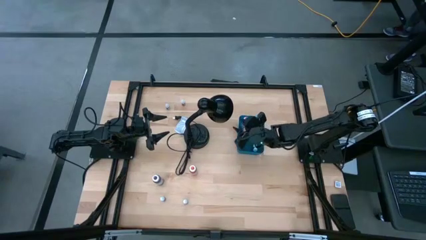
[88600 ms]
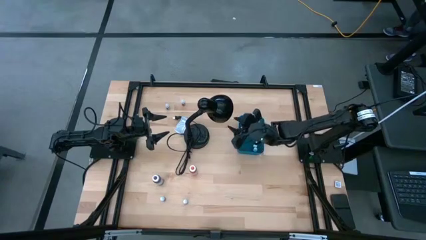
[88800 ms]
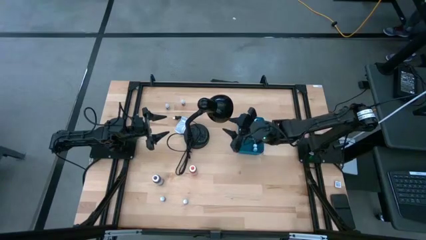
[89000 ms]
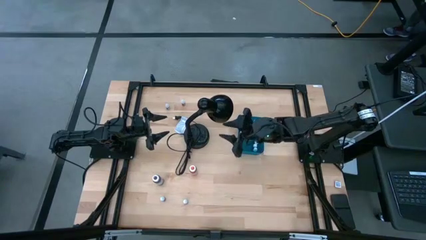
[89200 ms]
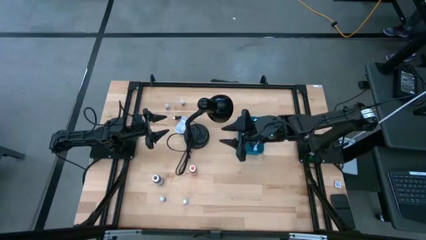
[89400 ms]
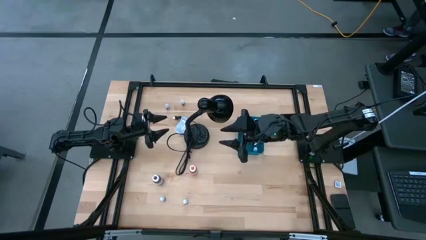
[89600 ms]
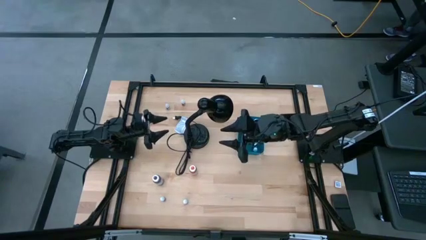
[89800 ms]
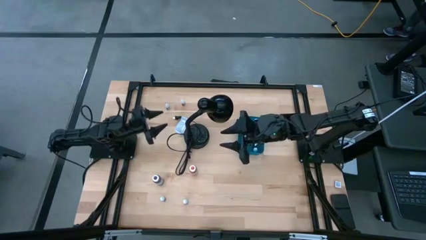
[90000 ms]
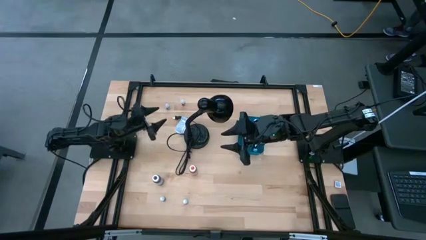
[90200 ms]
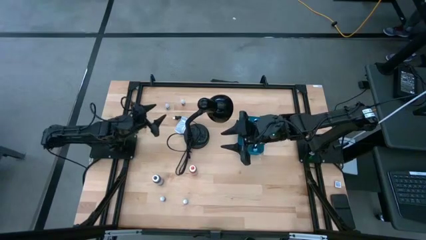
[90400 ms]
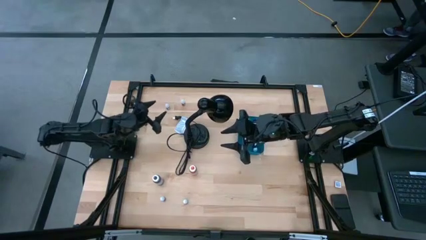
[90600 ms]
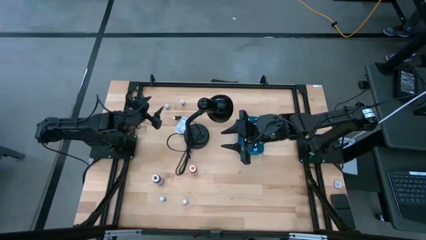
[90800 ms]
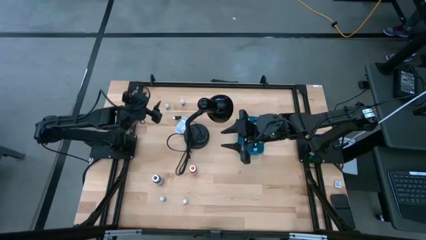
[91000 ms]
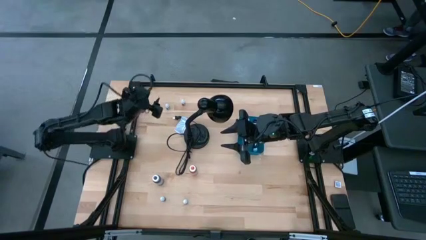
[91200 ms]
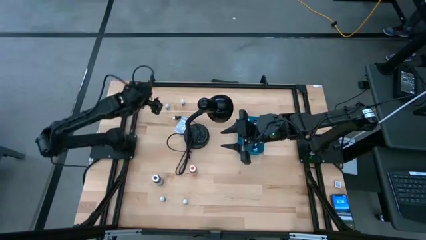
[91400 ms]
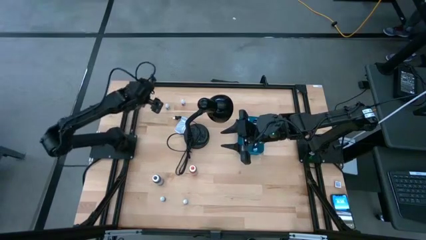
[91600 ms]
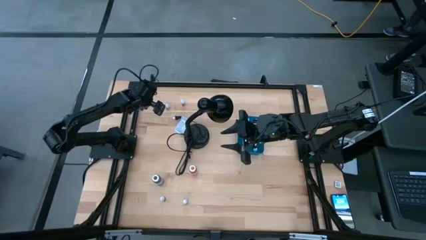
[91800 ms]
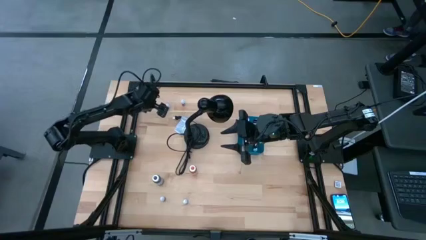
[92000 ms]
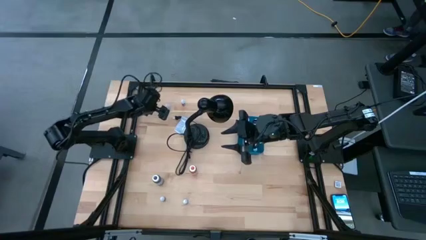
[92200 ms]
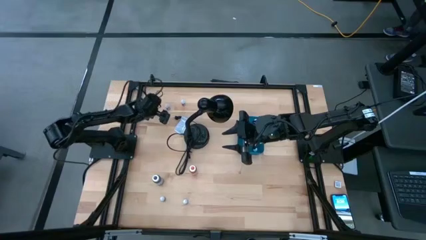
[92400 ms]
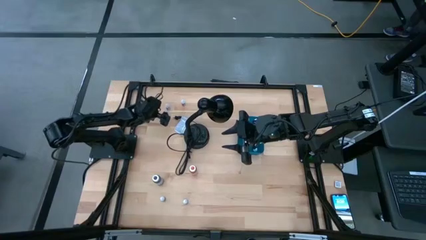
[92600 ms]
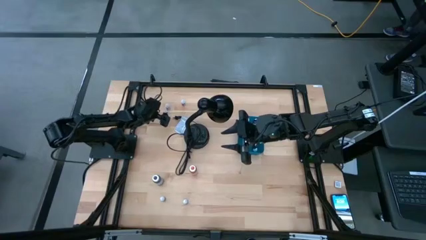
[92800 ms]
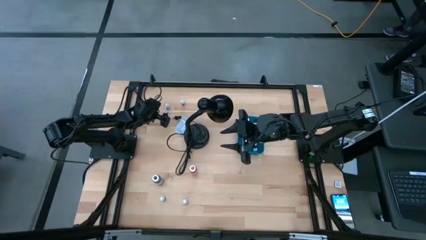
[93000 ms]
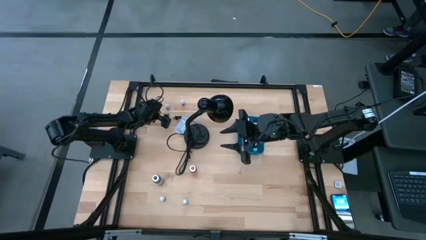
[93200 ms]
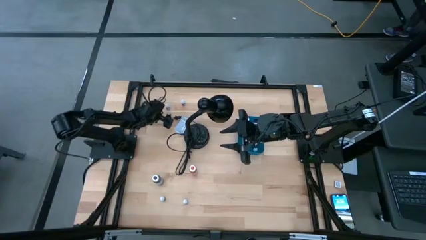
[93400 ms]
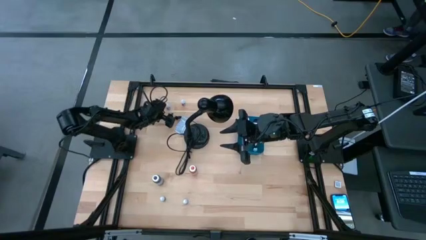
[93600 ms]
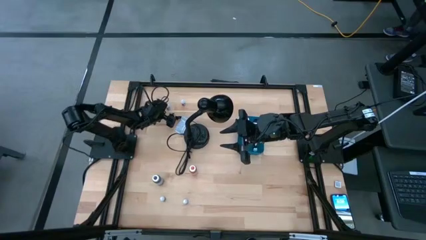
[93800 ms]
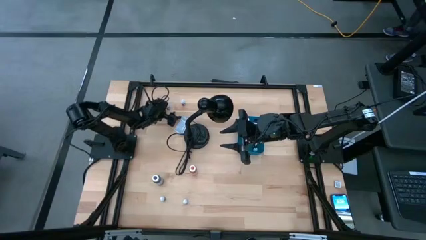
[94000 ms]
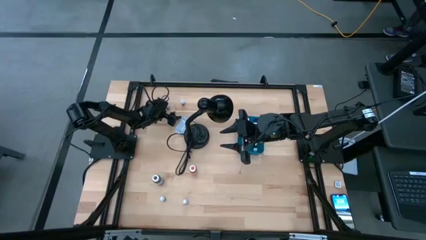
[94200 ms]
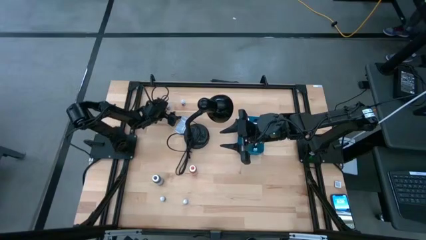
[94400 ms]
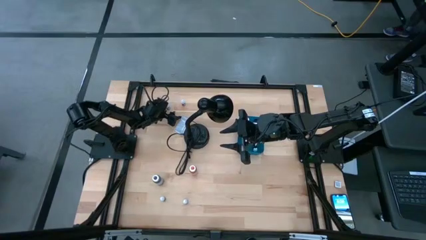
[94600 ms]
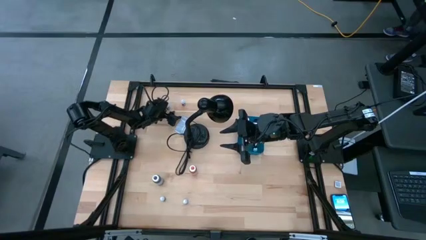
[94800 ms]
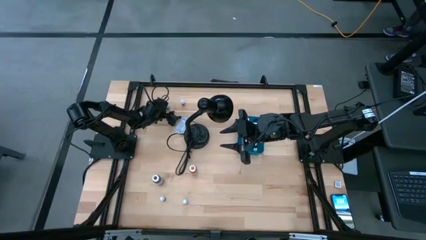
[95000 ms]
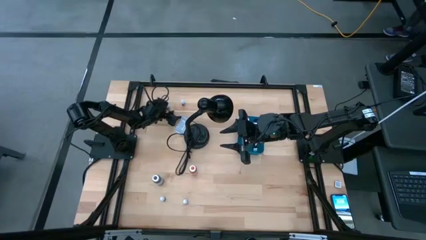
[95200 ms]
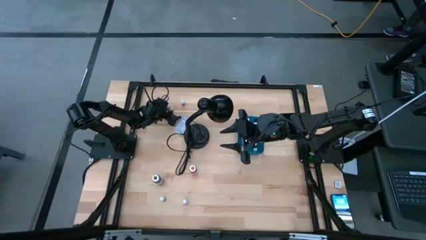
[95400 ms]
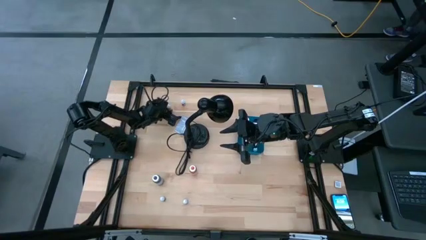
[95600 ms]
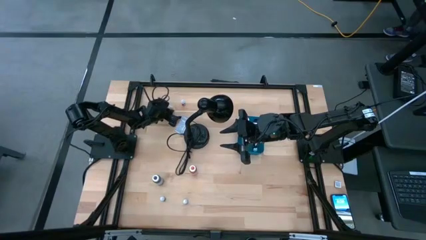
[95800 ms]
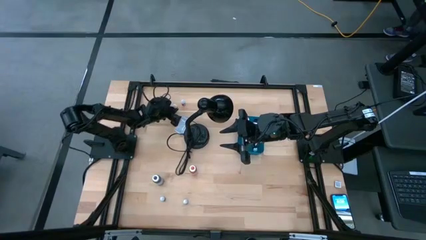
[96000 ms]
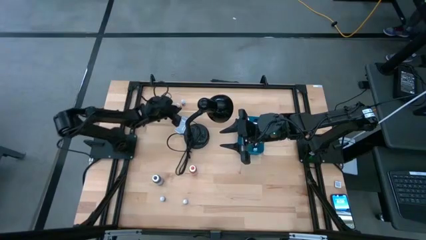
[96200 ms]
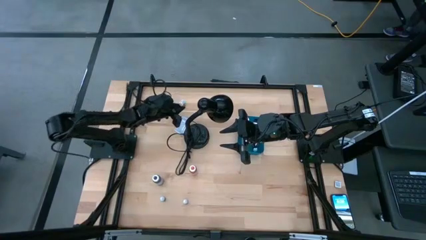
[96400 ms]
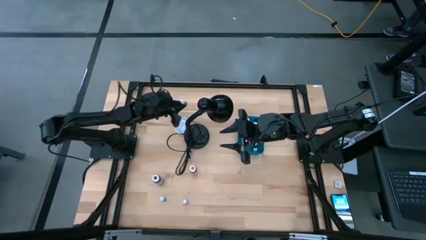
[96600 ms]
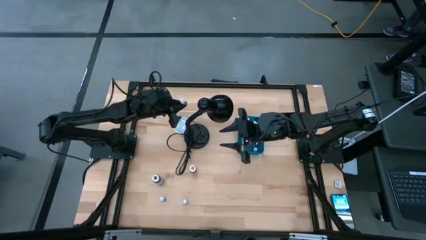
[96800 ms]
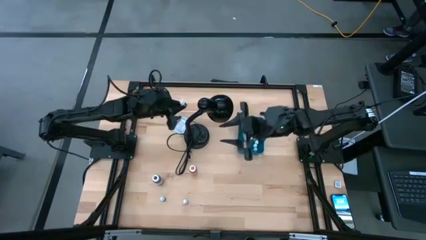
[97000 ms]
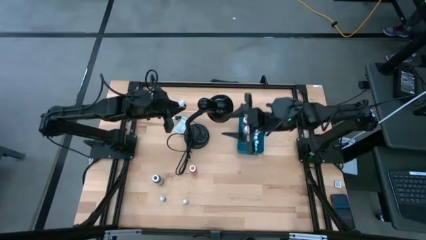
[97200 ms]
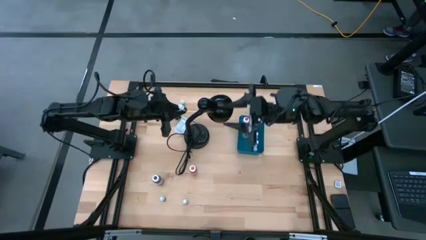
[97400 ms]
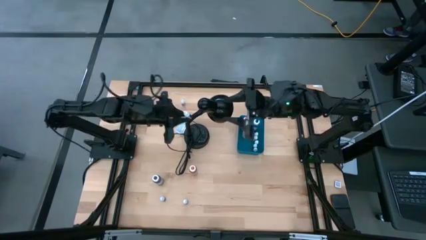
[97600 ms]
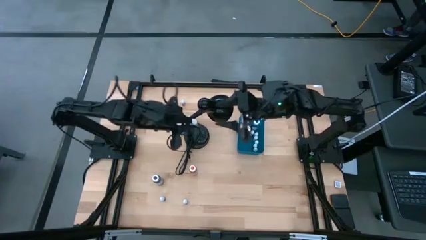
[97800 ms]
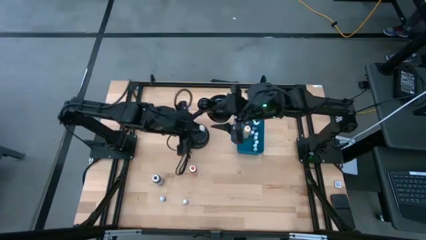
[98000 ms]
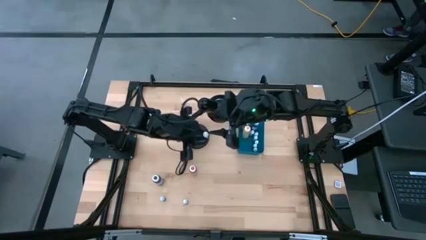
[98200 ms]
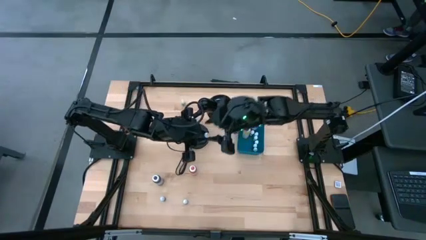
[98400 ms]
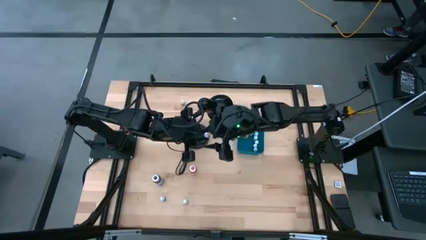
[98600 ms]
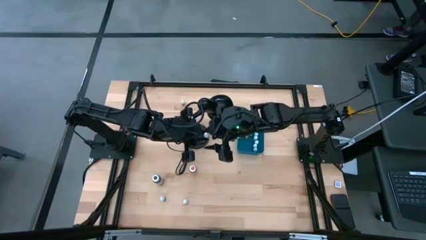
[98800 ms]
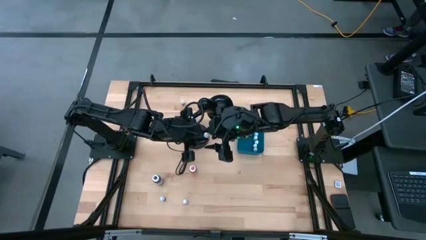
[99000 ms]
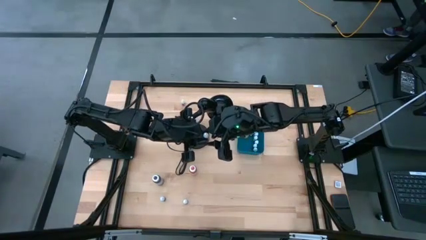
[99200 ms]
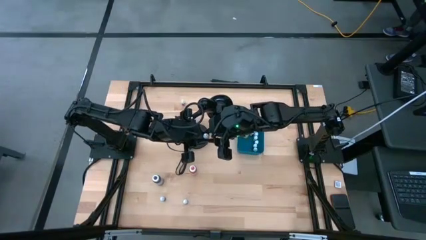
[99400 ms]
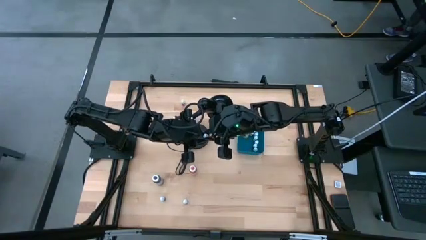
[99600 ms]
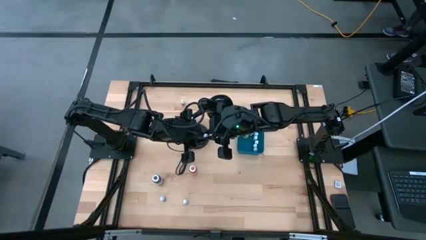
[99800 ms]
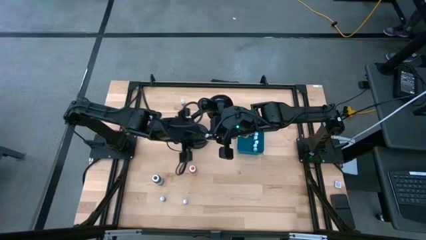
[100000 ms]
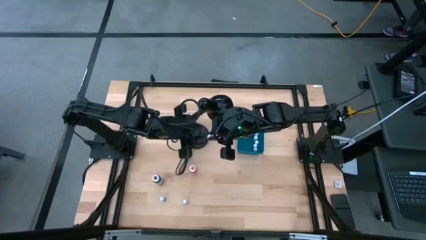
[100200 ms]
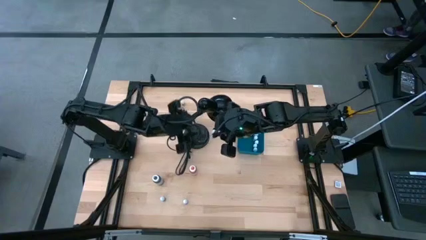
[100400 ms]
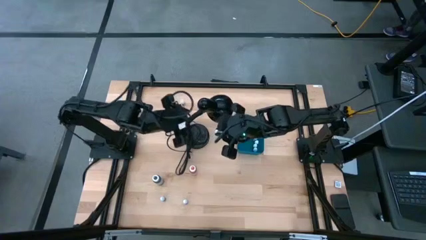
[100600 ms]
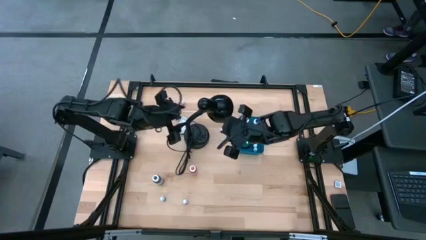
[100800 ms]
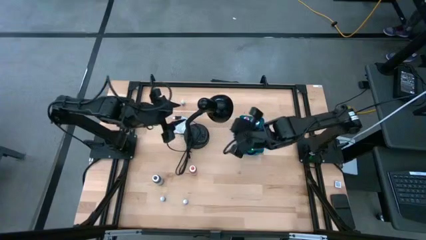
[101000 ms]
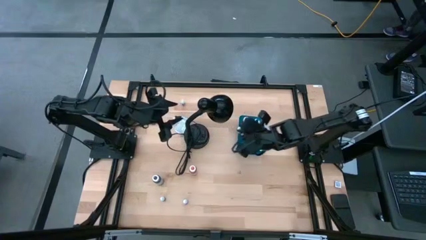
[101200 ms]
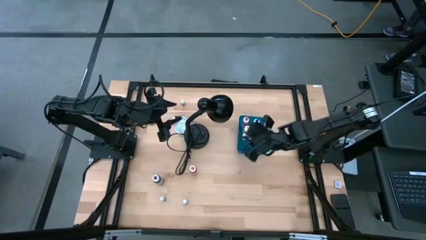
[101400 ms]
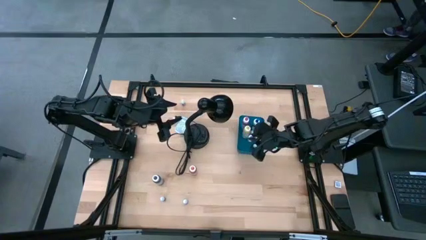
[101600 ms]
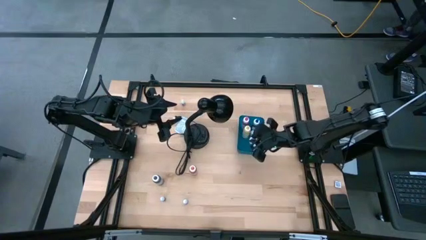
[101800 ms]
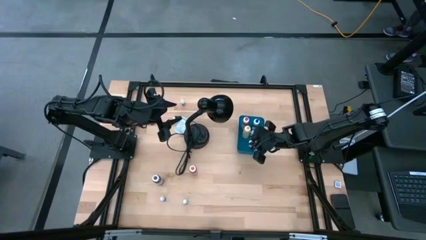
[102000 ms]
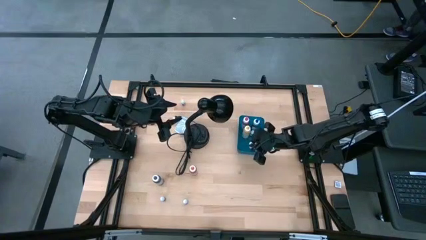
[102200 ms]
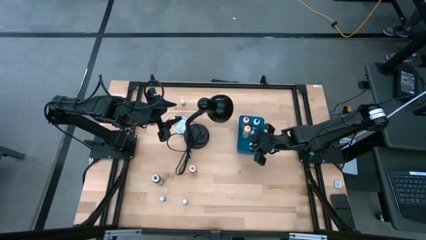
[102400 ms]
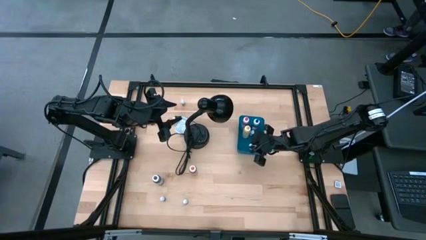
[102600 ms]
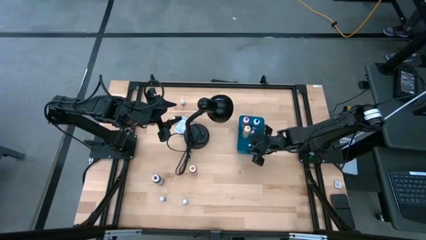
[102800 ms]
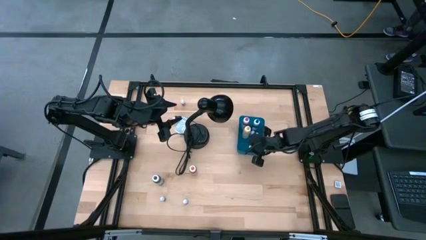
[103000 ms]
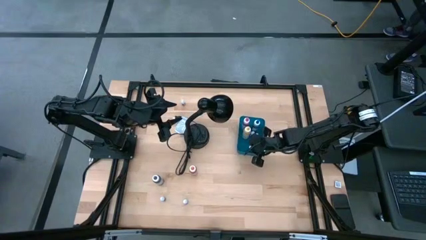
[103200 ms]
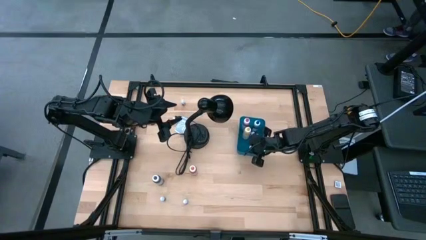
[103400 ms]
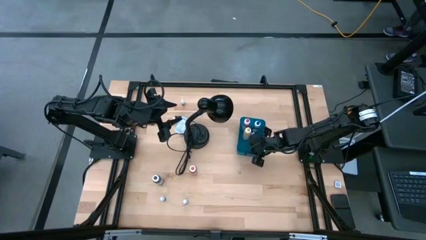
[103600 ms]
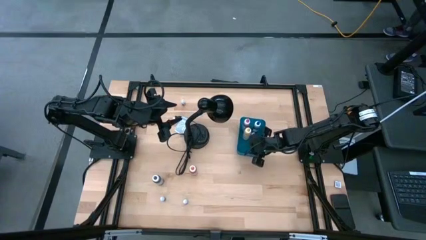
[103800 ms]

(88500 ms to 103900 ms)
Task: Pick & Place food coloring
Put the small brown food coloring bottle into the blue bin
